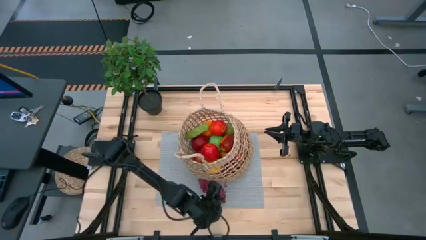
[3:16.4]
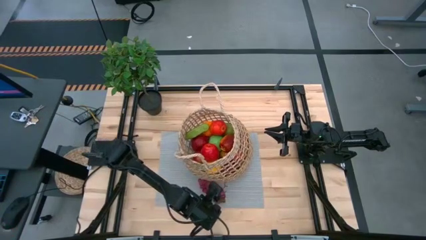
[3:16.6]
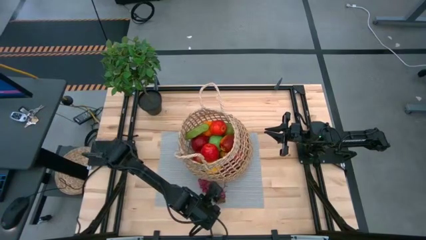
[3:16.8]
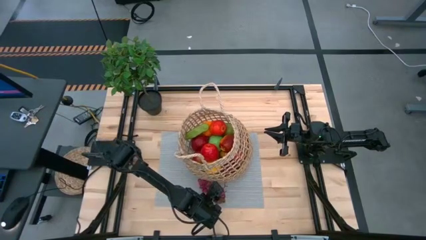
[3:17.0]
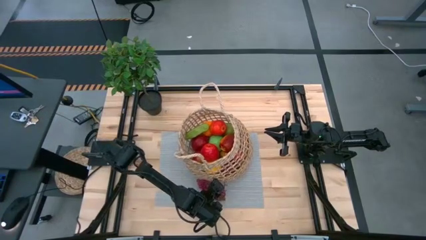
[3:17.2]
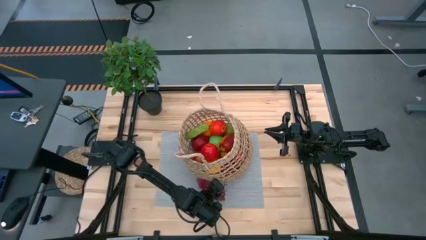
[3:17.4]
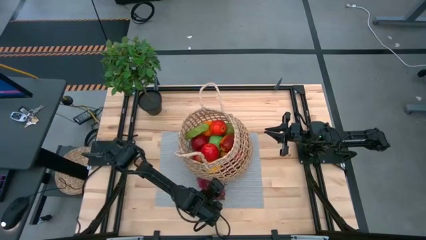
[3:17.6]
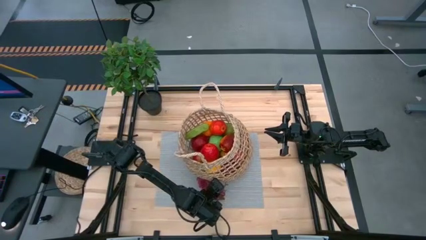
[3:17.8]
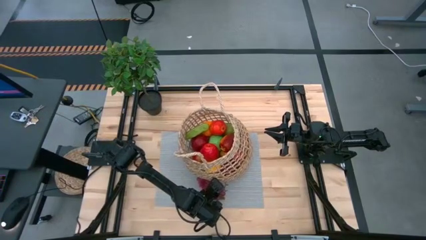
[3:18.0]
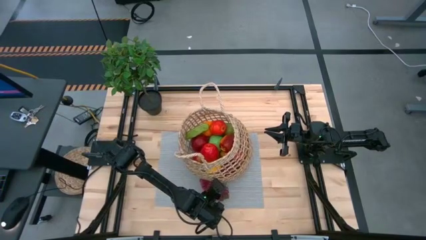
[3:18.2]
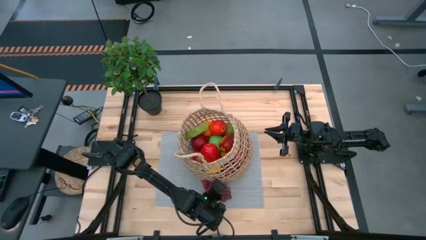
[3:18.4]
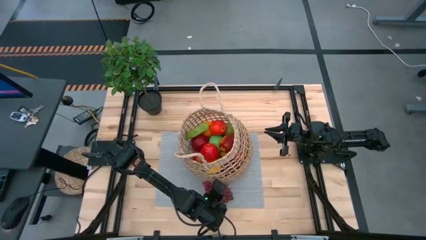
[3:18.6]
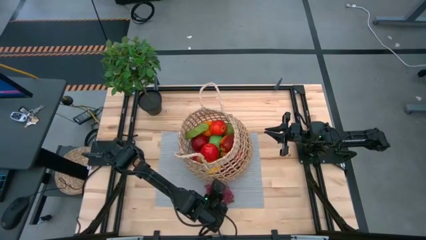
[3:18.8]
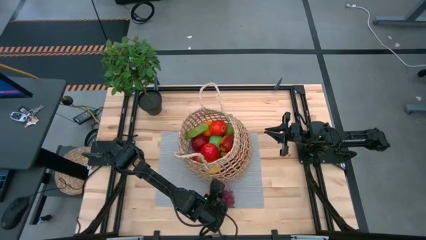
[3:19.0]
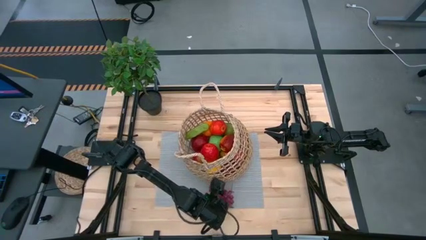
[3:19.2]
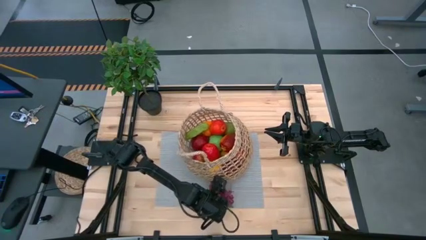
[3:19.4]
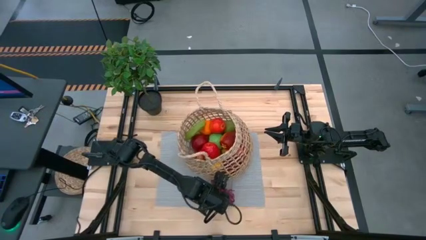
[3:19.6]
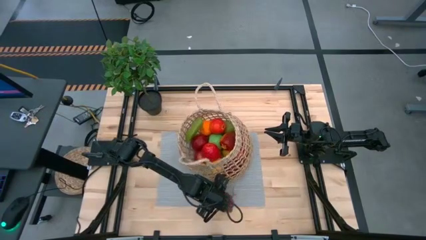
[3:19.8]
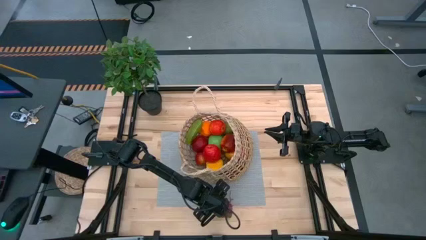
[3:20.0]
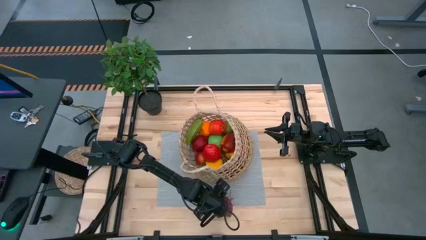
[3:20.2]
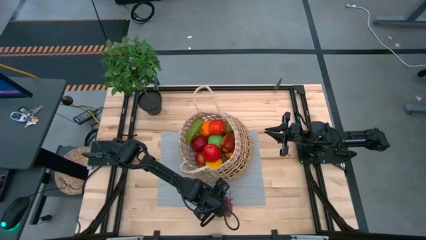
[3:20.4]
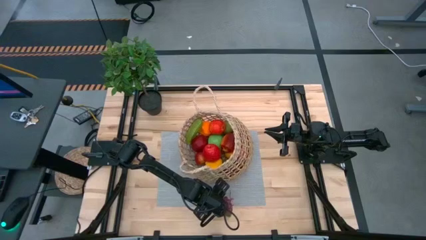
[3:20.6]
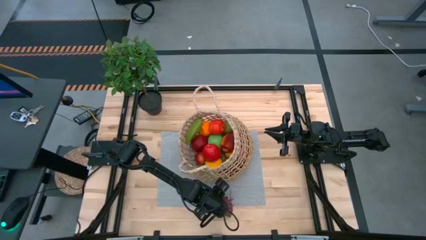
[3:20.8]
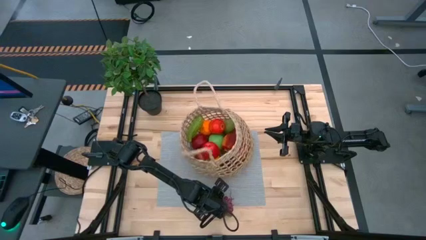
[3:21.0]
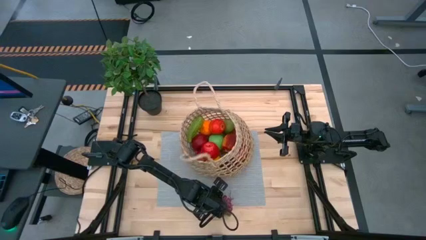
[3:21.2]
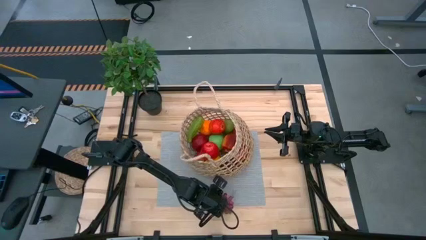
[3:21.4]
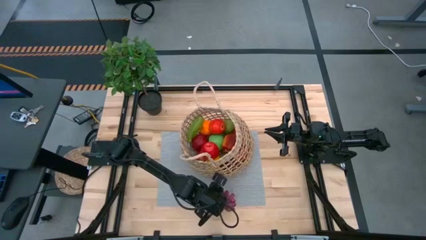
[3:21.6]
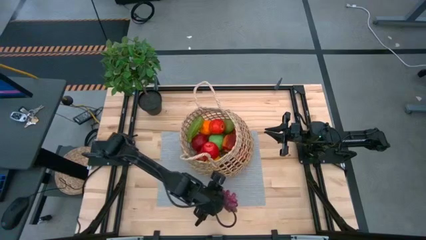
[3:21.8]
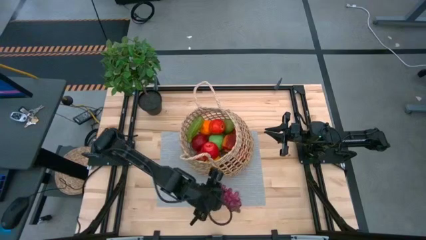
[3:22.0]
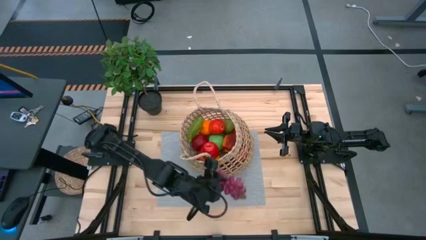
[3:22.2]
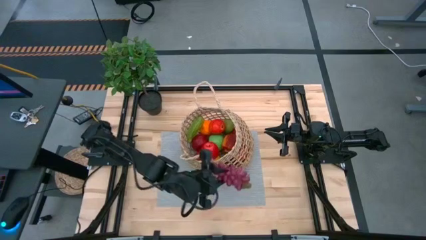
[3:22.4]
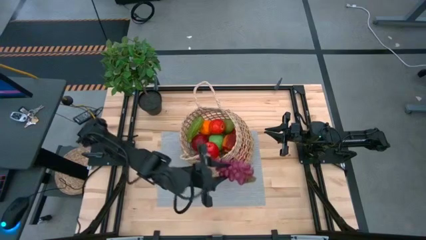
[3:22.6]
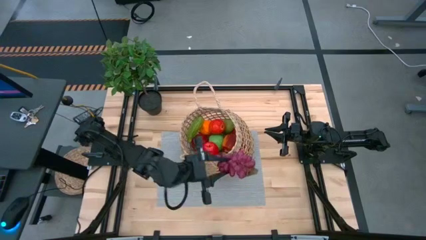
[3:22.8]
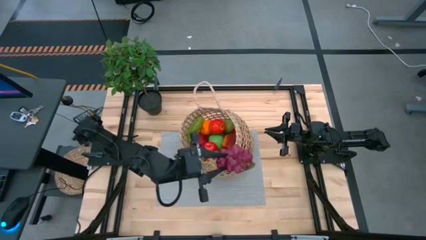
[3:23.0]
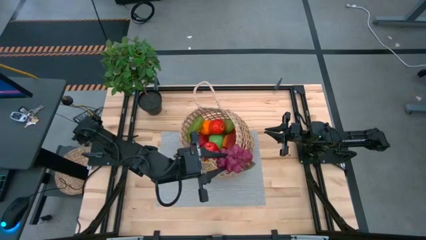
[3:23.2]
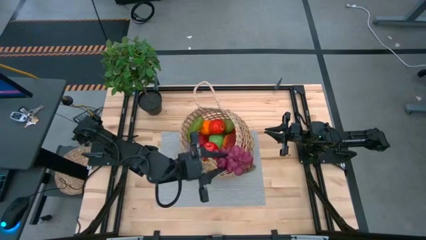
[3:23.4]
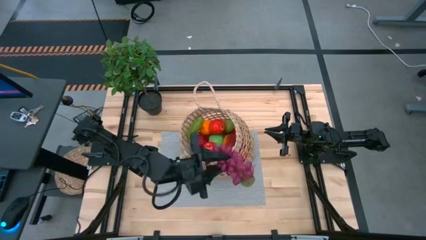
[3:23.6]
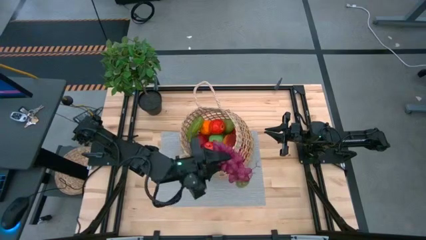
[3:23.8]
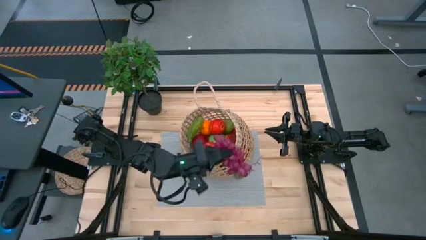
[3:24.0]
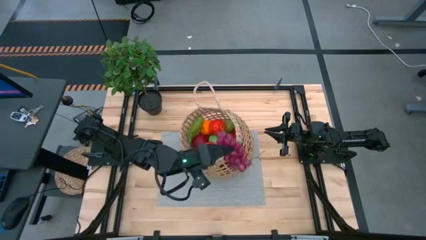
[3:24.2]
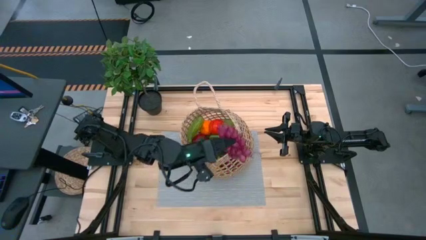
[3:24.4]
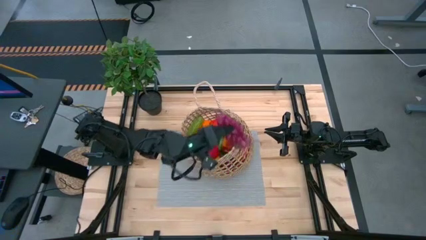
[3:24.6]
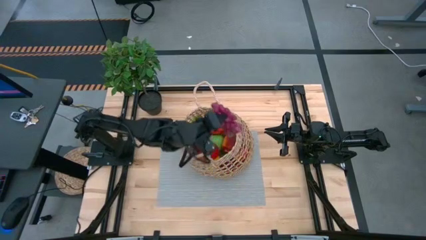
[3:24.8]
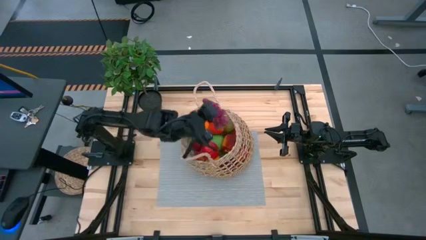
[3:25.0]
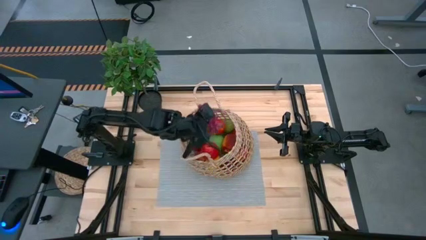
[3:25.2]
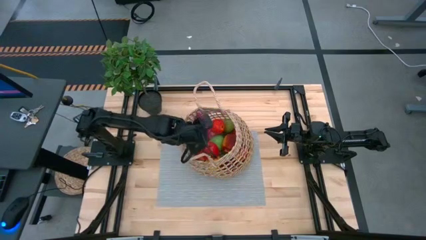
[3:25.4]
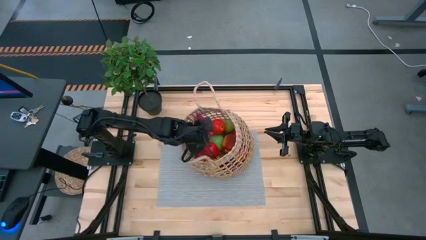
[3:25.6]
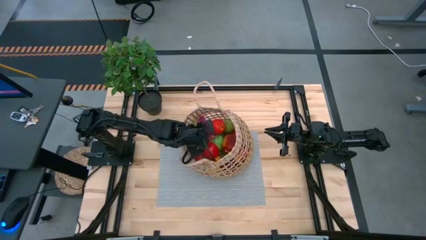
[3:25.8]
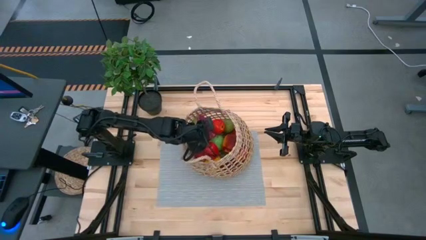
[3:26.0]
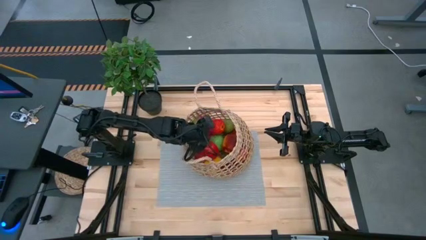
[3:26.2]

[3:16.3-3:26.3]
Task: Build produce basket
Put the grapes into the basket

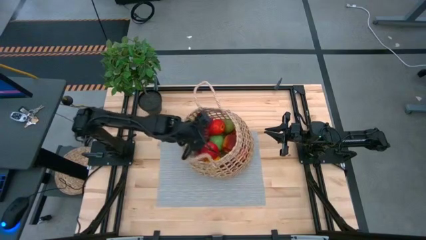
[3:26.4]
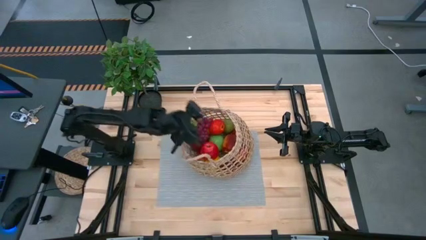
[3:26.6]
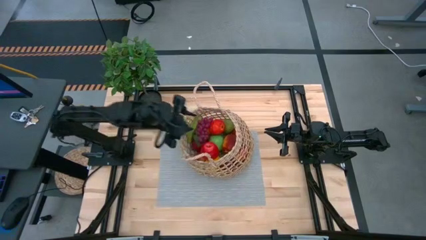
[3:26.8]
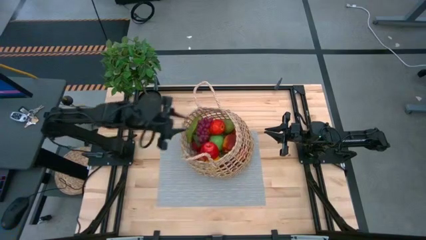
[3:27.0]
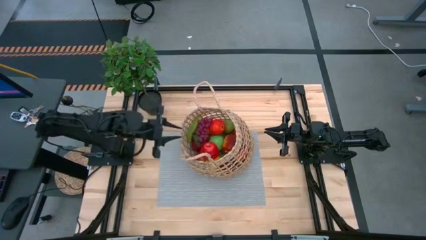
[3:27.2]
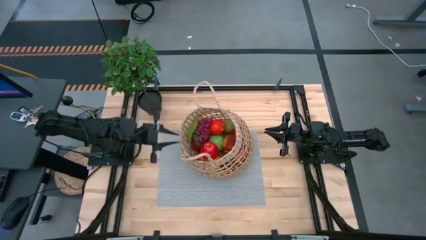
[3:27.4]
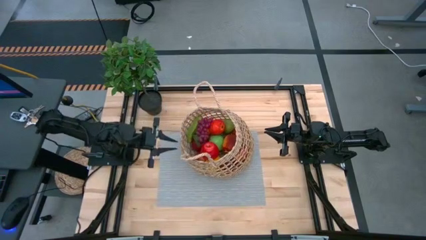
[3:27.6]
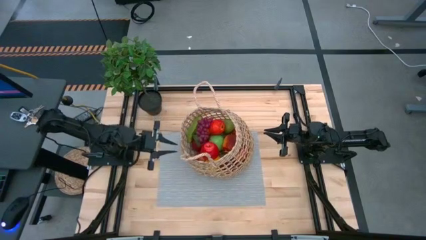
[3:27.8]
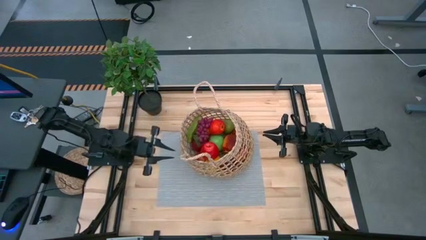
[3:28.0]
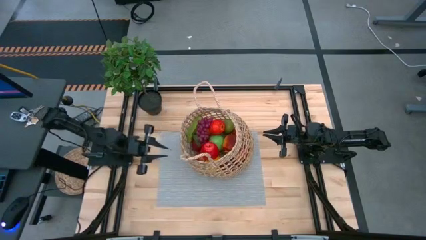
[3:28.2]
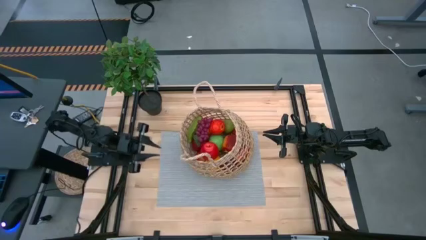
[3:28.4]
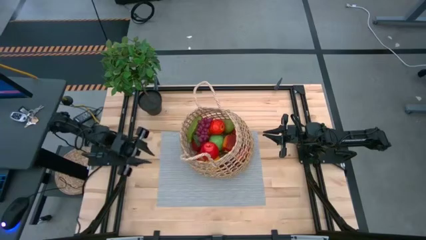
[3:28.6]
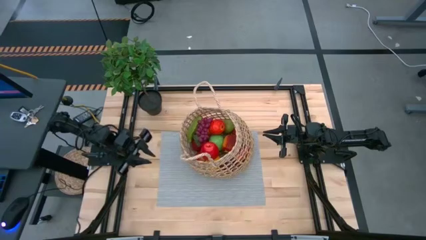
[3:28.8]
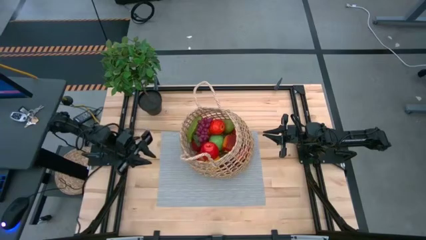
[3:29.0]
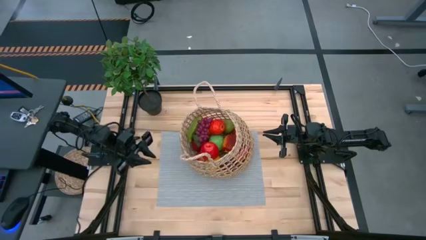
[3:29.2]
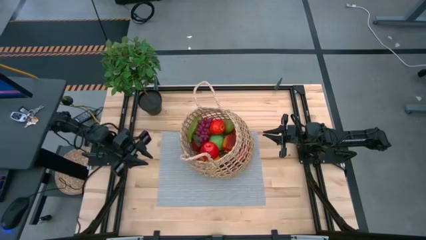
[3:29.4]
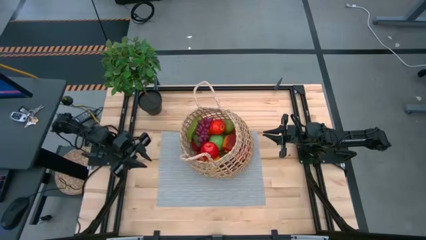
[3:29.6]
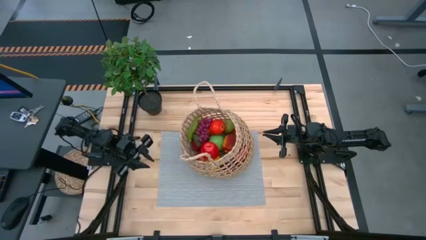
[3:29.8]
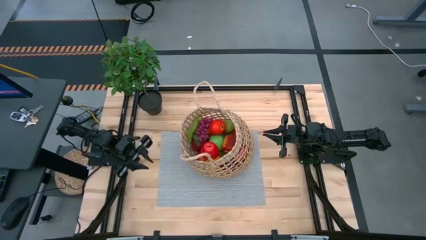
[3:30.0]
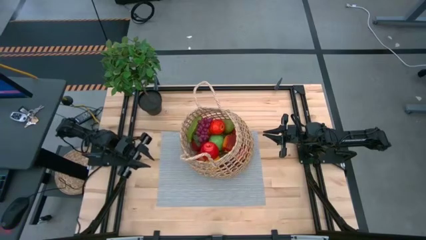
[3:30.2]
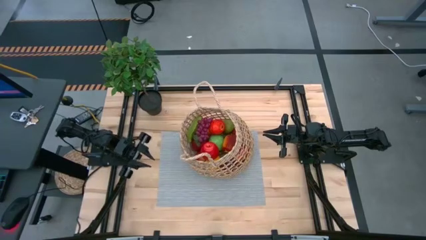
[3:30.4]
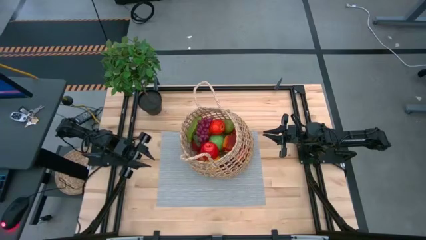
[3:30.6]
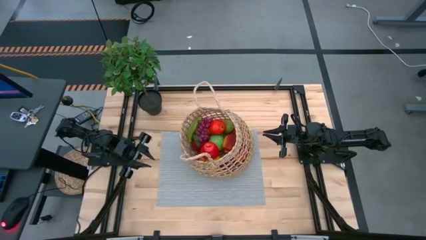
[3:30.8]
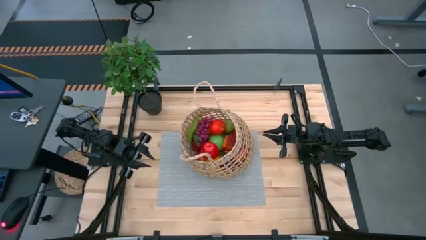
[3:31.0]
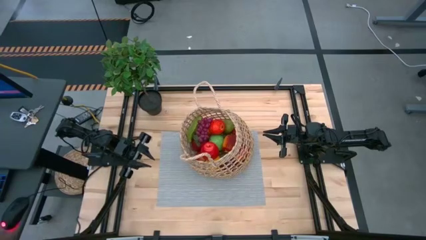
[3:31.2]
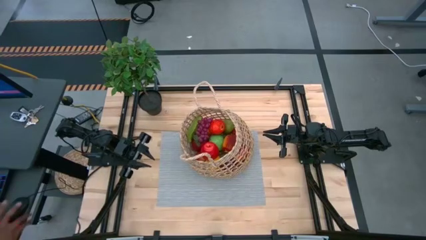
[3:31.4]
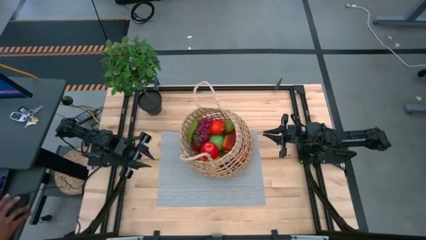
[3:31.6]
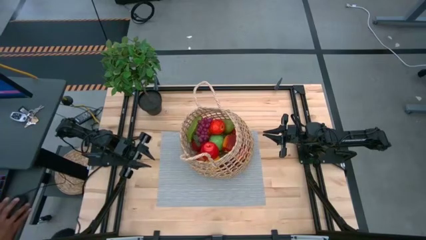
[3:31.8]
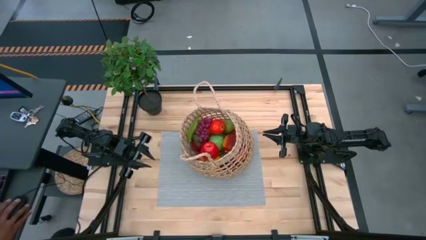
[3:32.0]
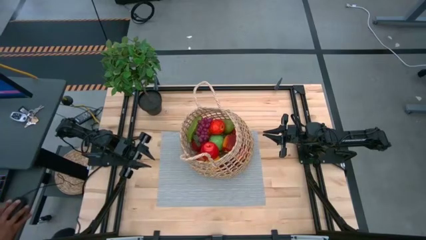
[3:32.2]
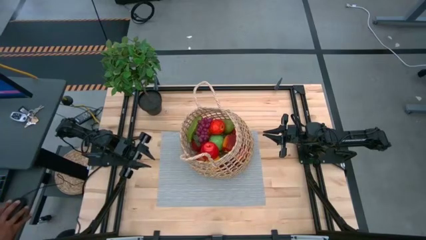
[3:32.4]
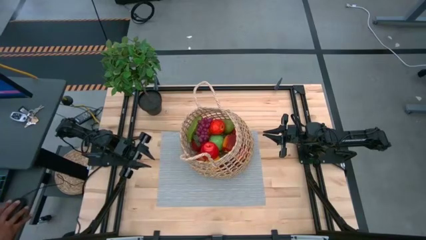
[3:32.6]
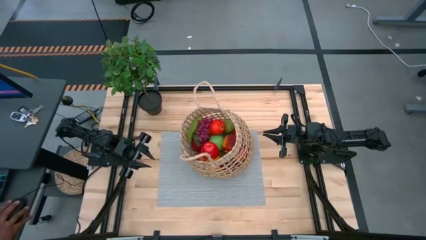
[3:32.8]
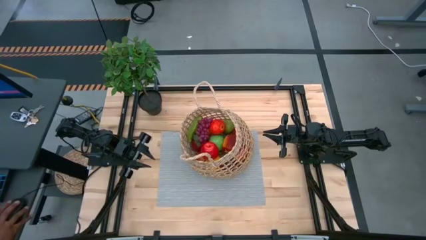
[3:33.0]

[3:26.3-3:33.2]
Return to Home Position
